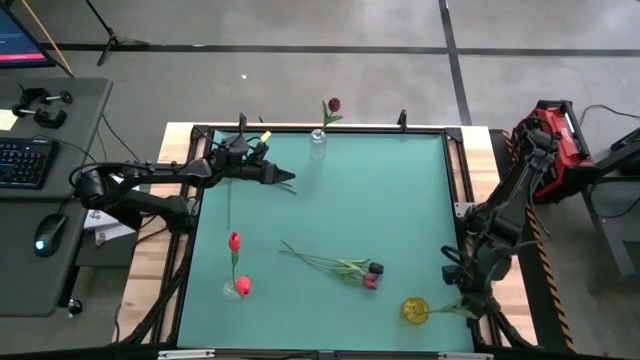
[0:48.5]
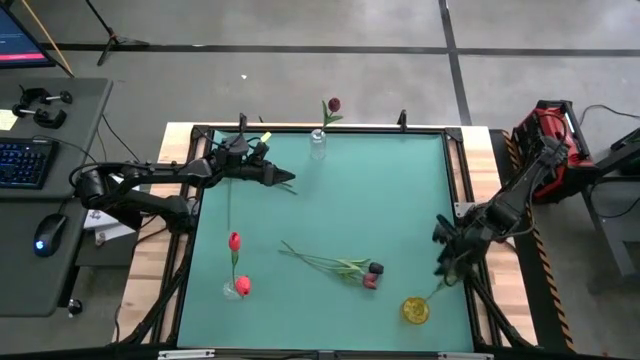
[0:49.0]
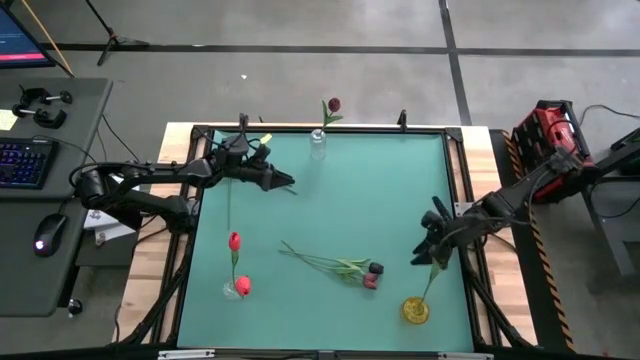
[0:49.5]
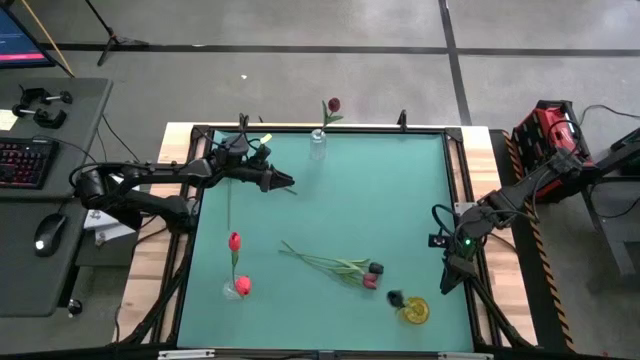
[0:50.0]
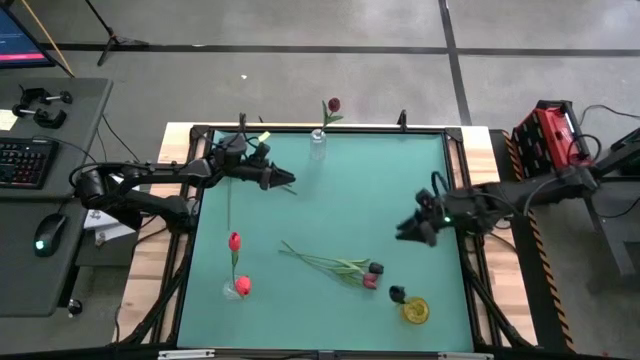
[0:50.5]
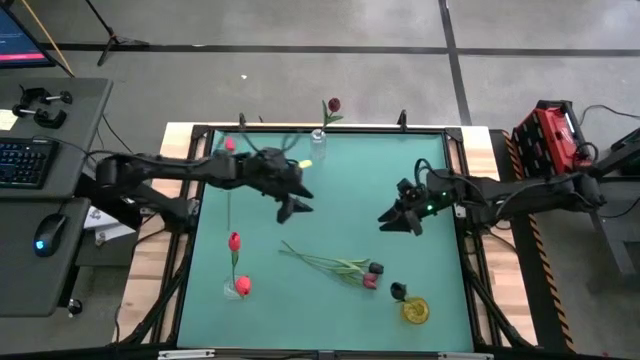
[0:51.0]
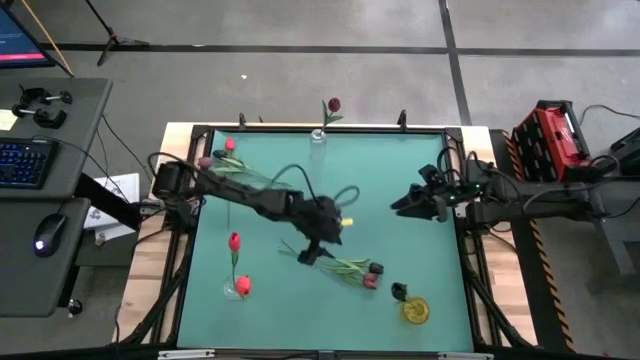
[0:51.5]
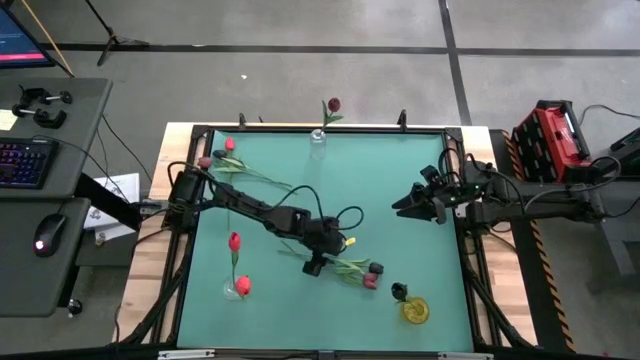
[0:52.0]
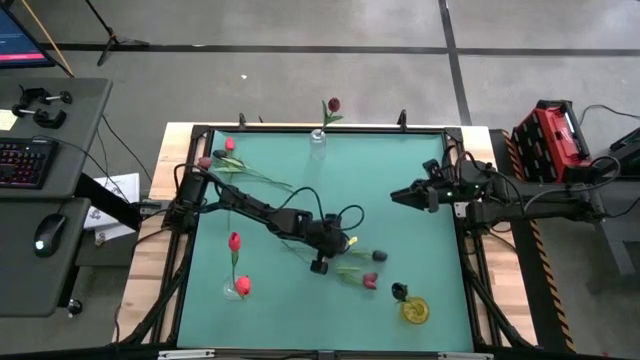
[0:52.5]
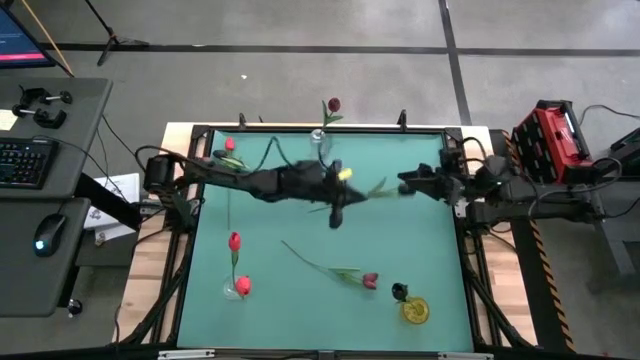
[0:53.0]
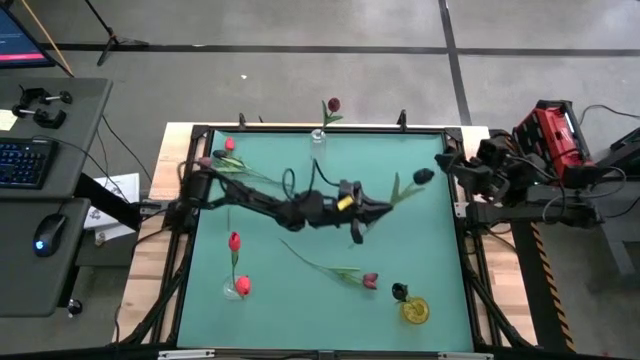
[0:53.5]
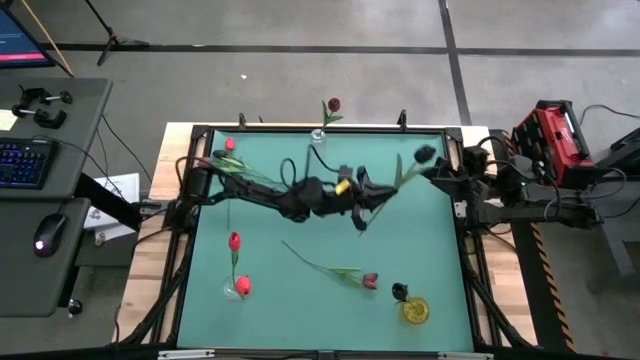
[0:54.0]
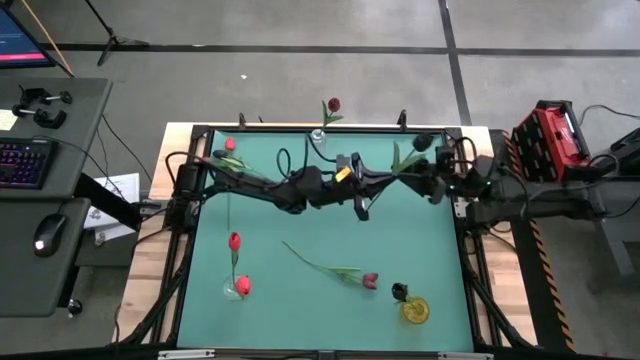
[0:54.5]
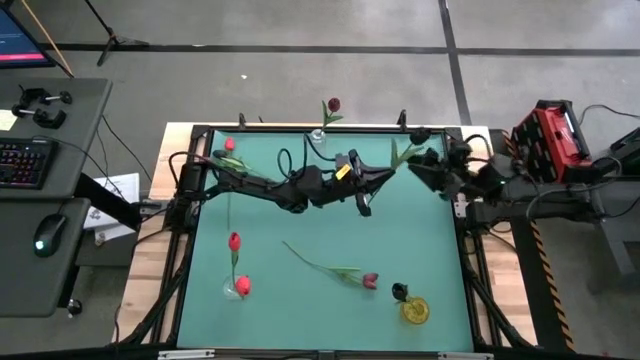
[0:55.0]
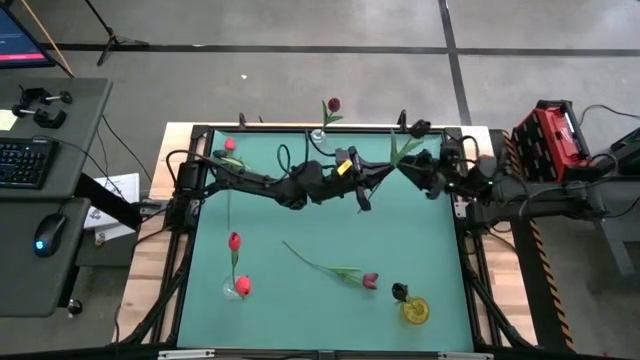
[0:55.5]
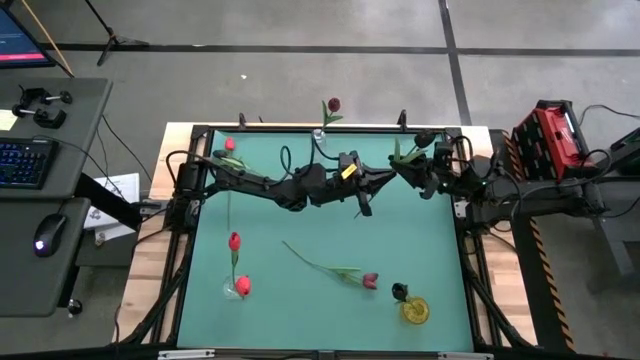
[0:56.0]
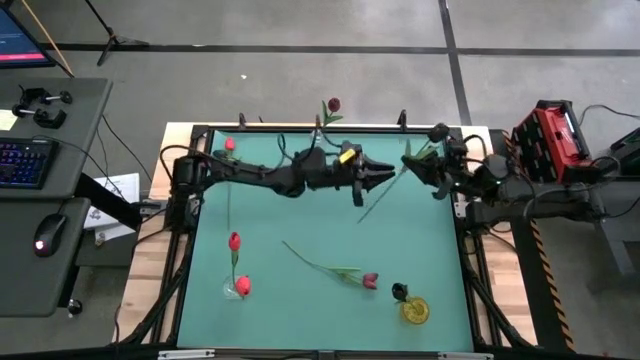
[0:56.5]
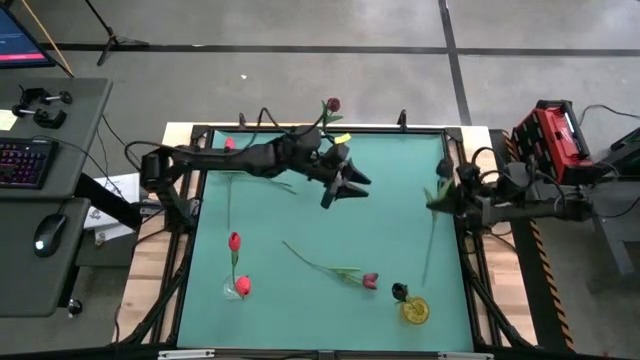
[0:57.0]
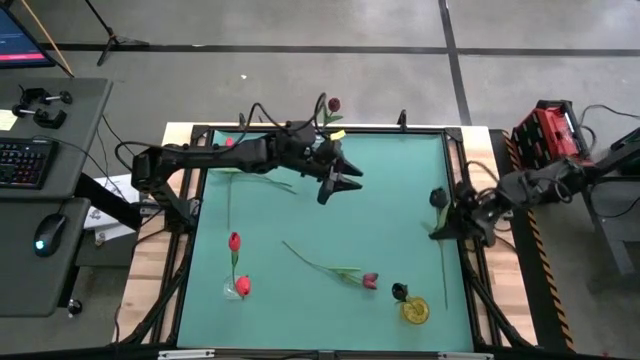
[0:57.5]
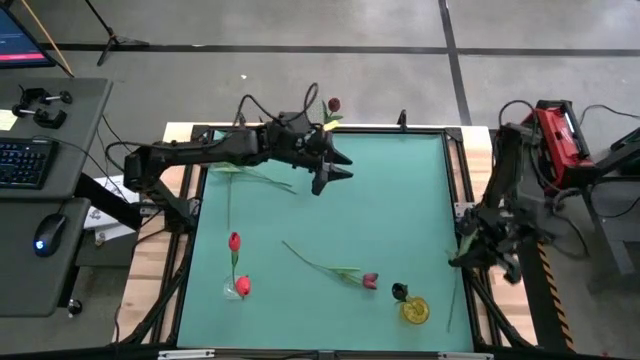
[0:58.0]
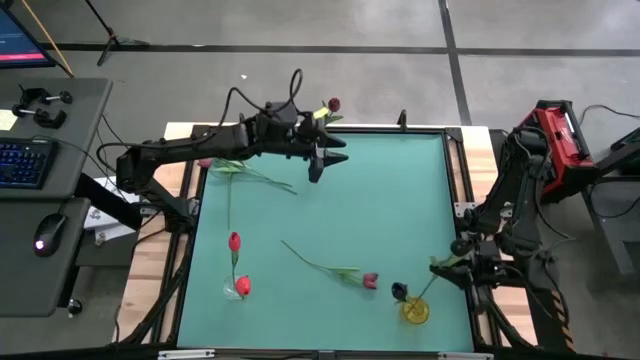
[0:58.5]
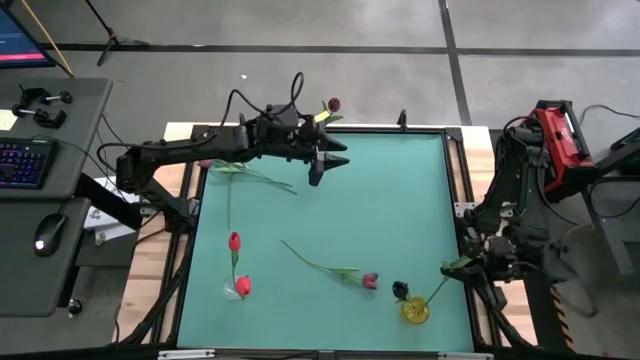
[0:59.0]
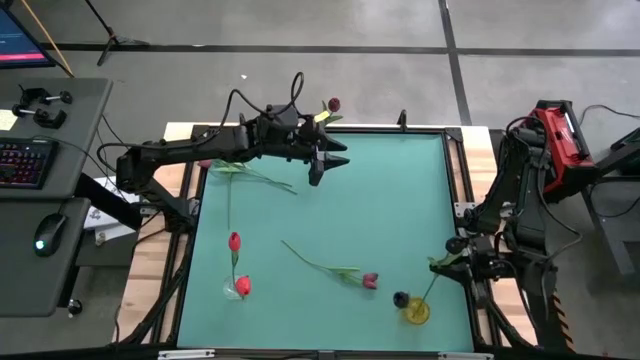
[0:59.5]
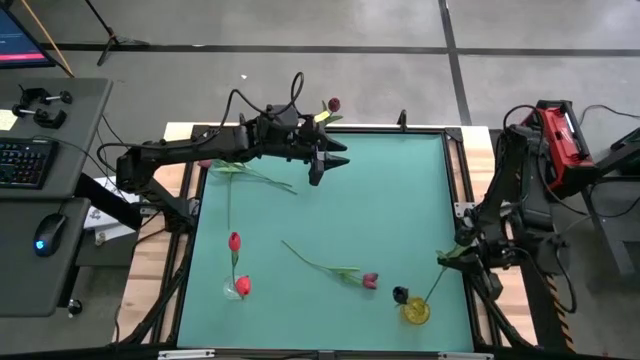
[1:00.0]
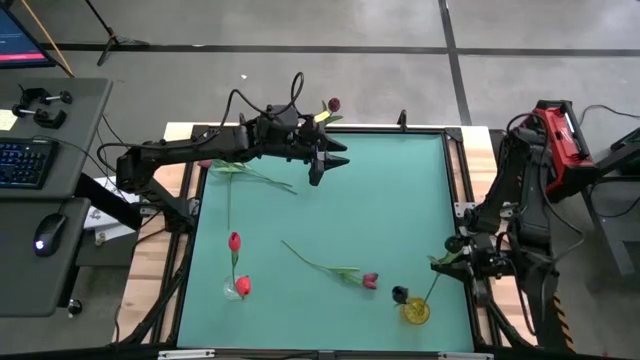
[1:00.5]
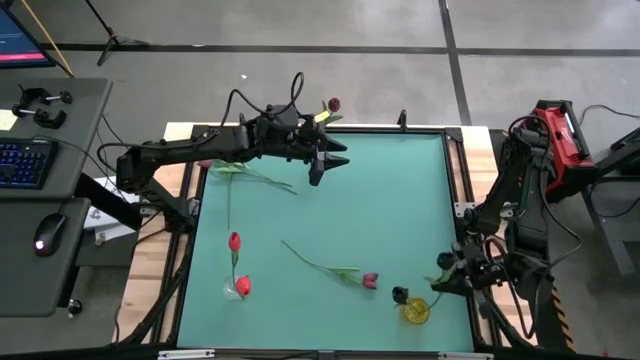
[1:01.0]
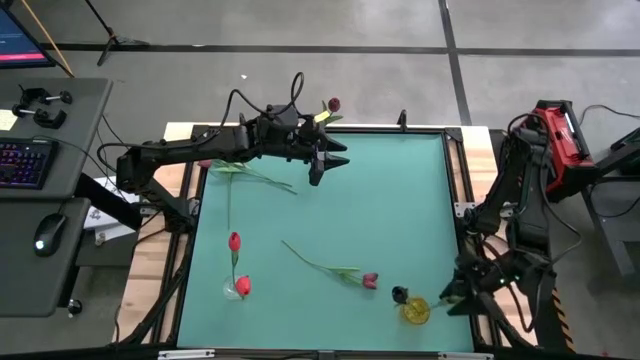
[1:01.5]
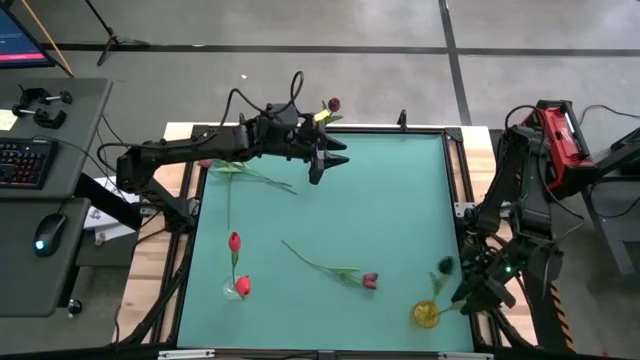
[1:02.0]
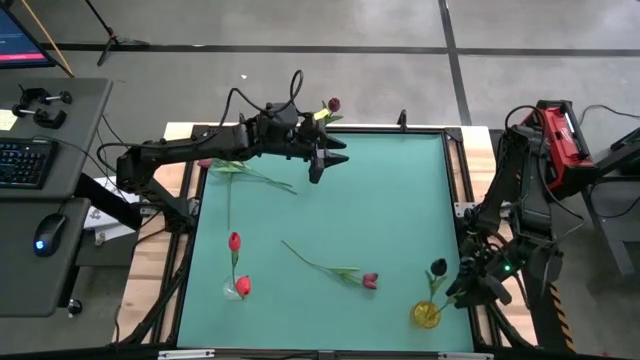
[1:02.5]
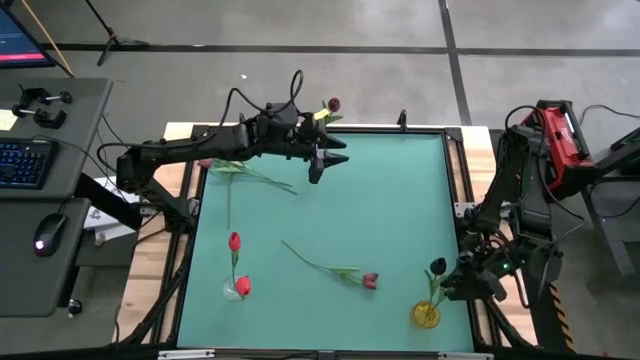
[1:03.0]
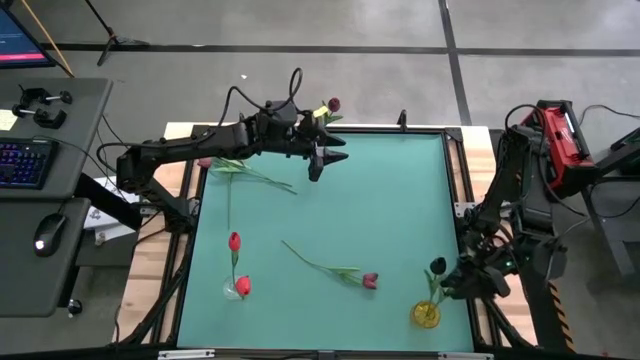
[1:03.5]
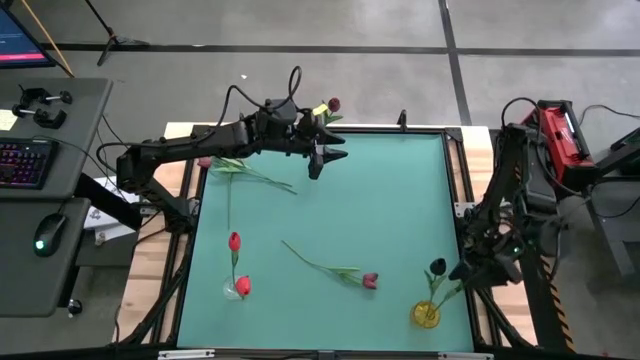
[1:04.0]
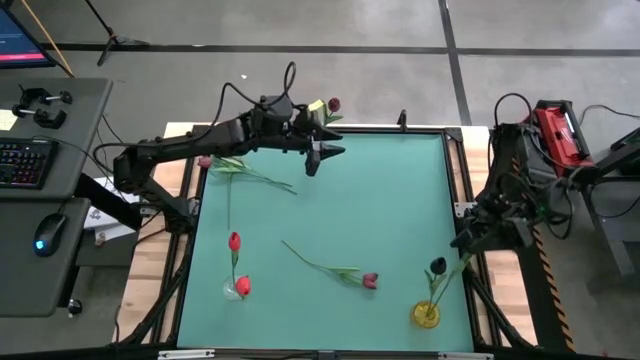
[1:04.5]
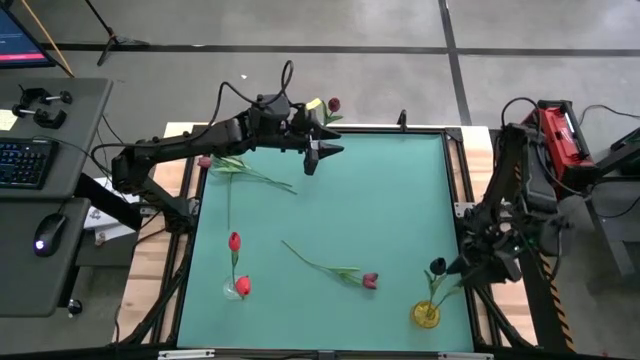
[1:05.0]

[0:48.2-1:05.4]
Task: Sort flowers into vase by color
Put the bottom black flower into the yellow vase

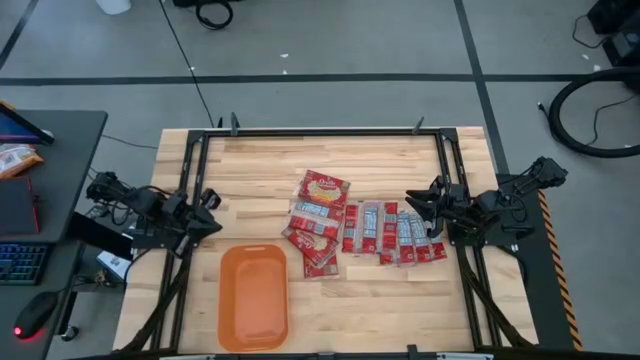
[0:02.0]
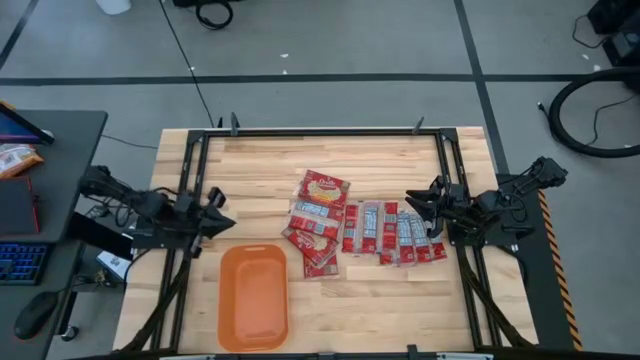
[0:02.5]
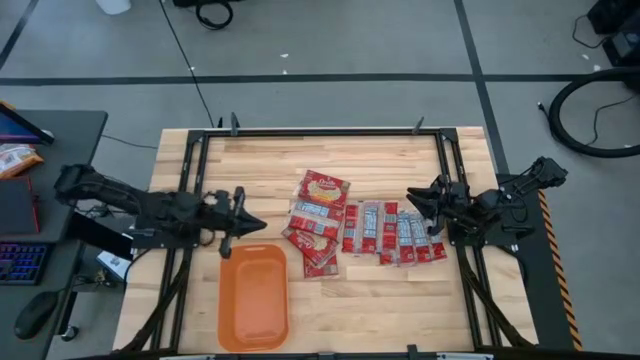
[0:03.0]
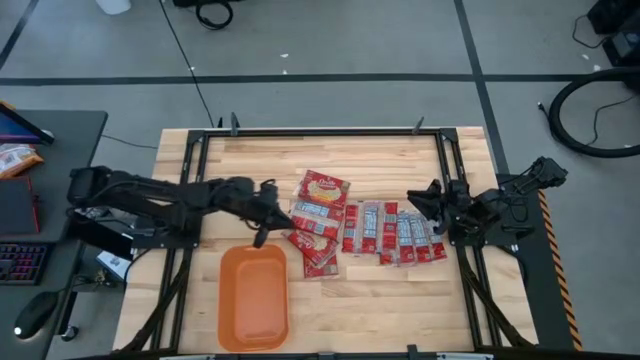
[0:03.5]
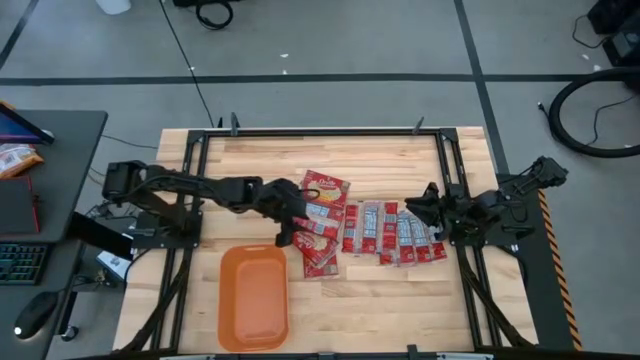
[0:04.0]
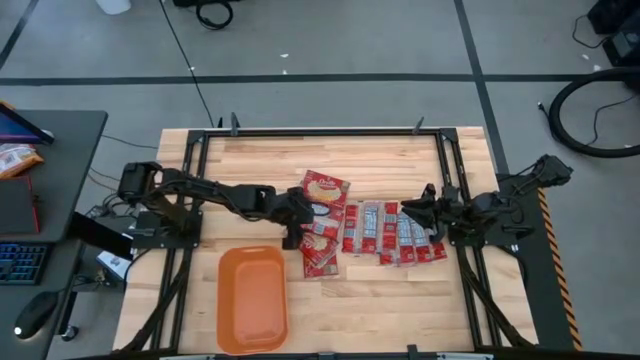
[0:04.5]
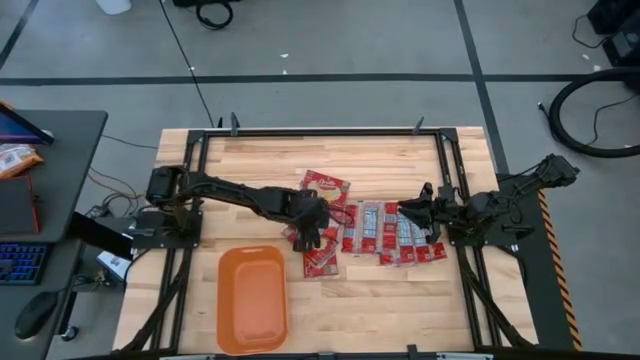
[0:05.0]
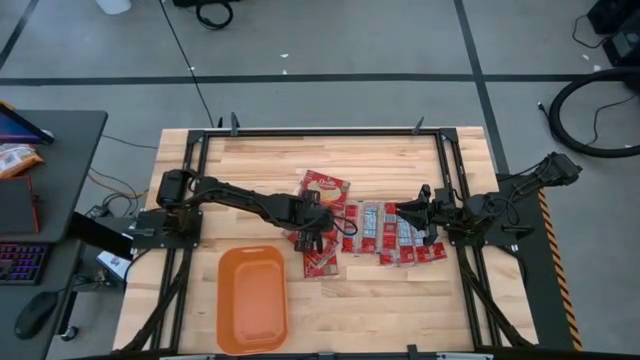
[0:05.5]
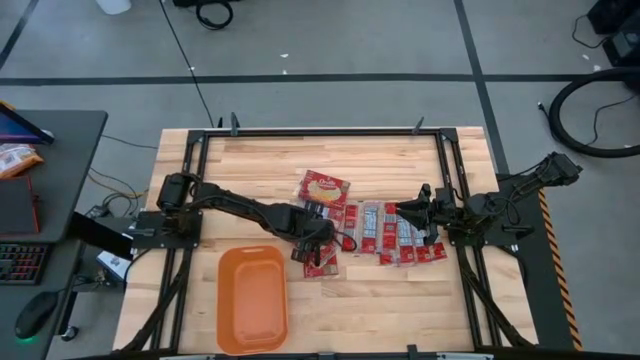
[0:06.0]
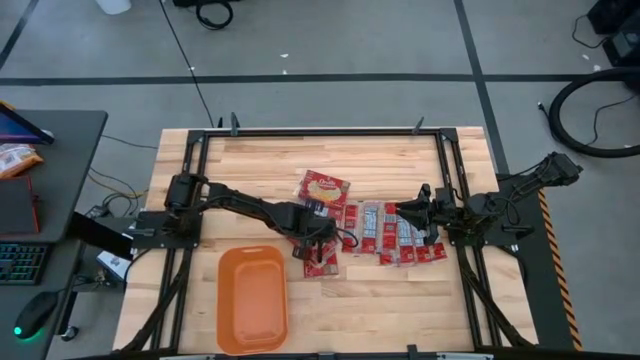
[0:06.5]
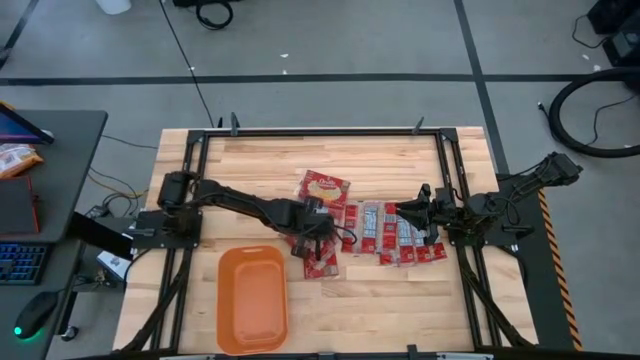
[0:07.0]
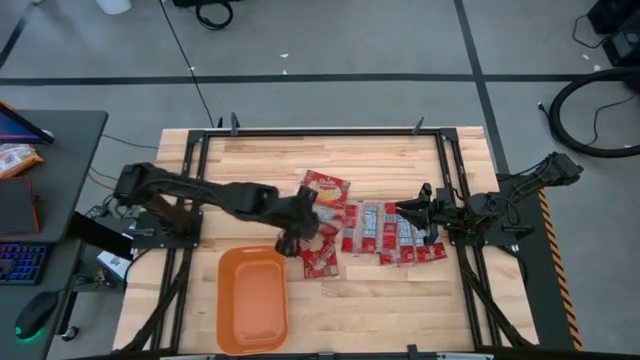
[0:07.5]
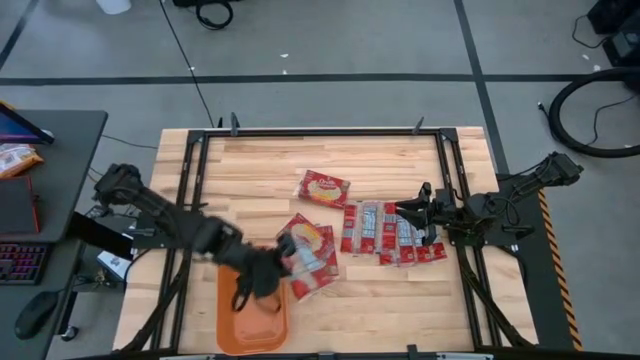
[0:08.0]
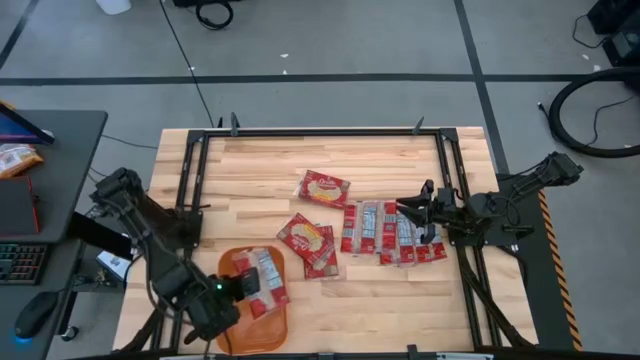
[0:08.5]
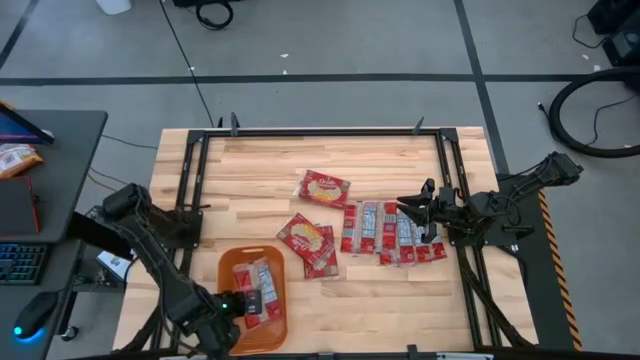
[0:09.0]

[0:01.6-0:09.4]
Task: Sort popcorn bags into baskets
Put the red popcorn pack into the orange bin
